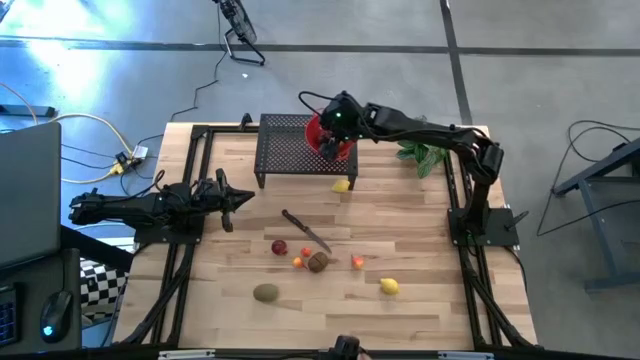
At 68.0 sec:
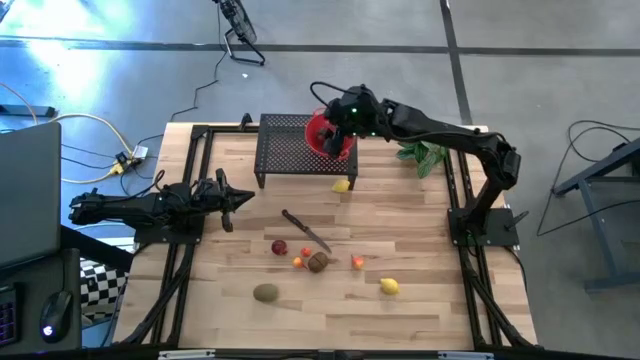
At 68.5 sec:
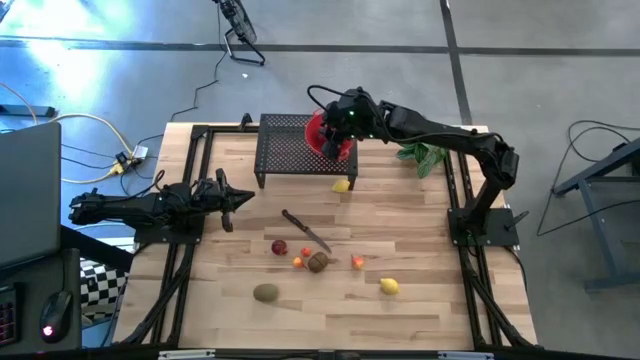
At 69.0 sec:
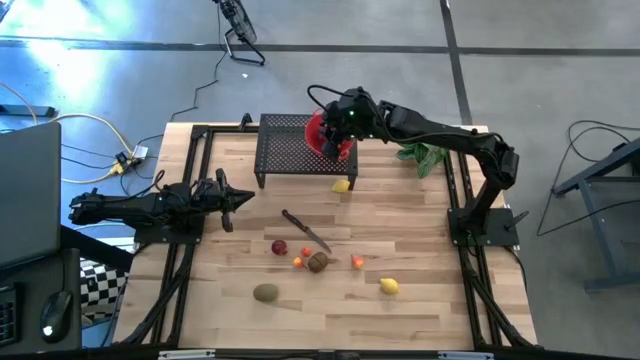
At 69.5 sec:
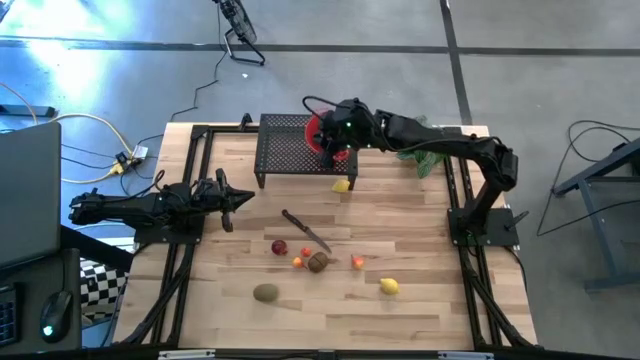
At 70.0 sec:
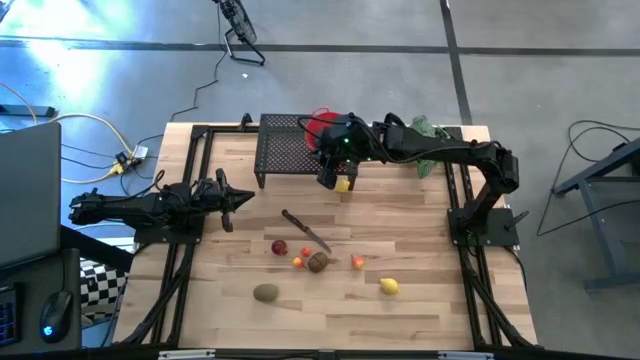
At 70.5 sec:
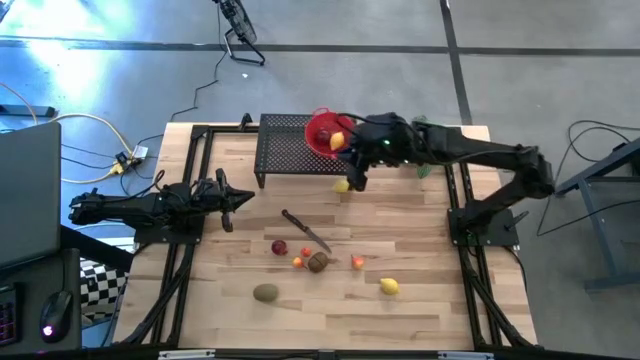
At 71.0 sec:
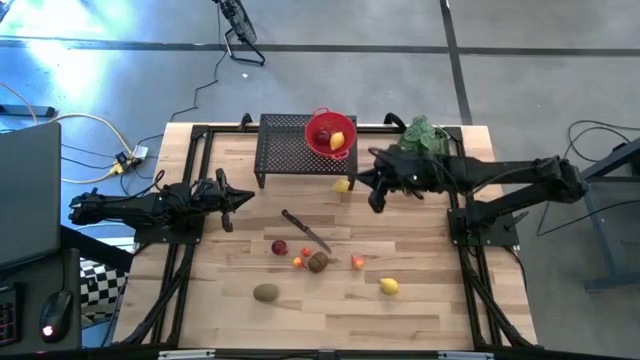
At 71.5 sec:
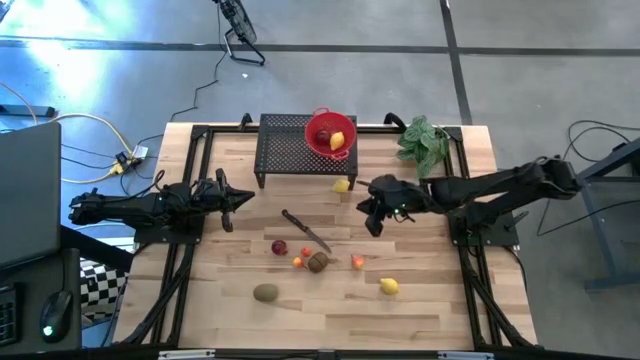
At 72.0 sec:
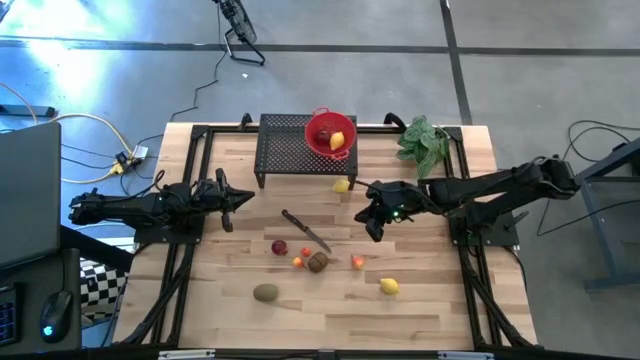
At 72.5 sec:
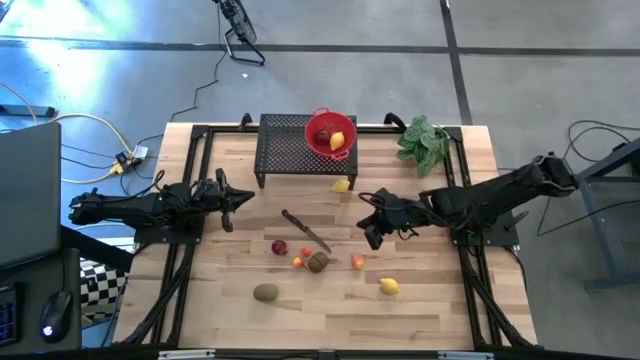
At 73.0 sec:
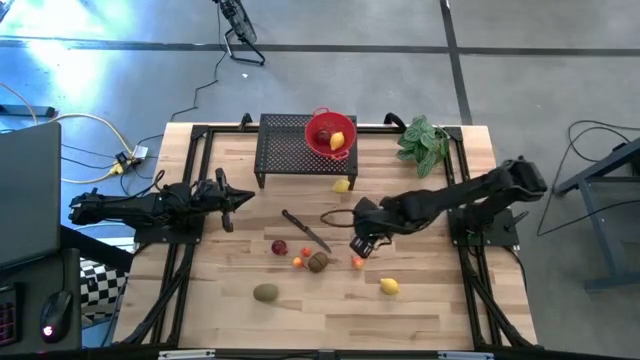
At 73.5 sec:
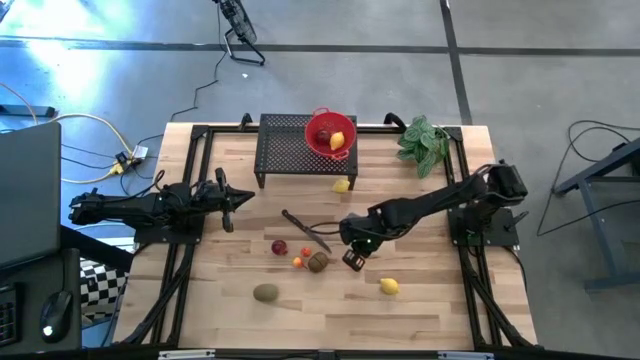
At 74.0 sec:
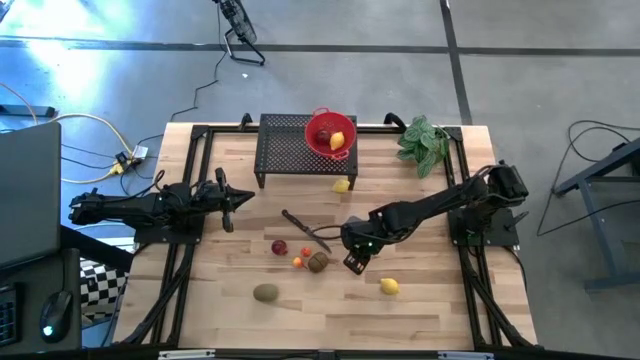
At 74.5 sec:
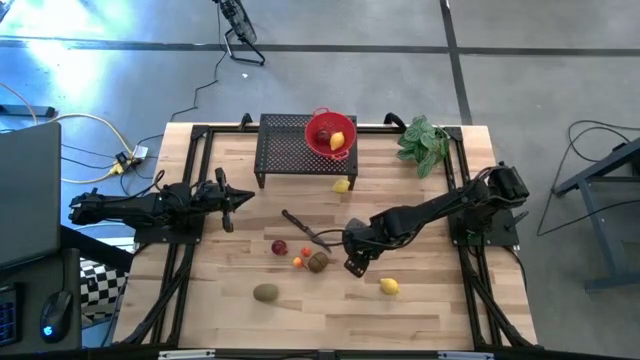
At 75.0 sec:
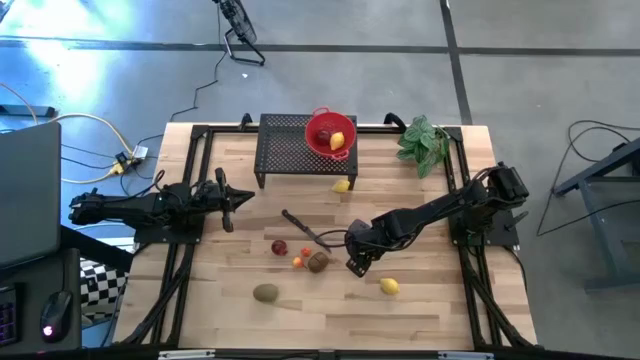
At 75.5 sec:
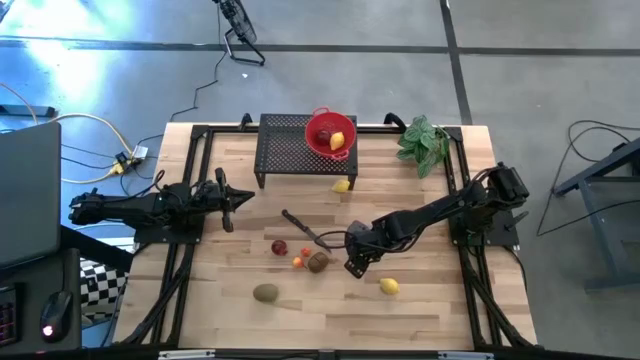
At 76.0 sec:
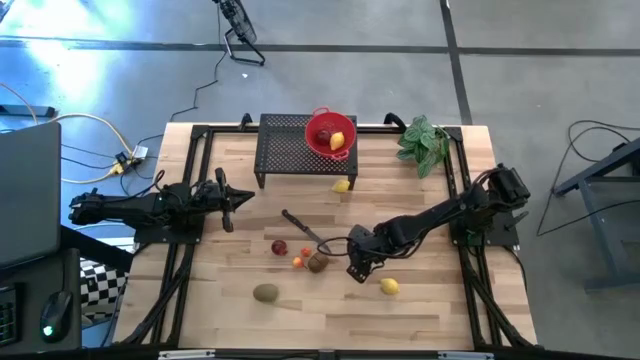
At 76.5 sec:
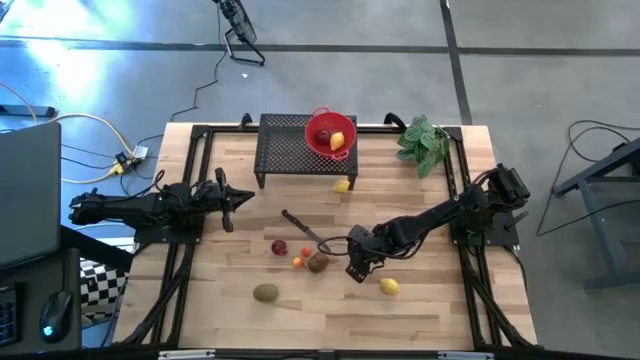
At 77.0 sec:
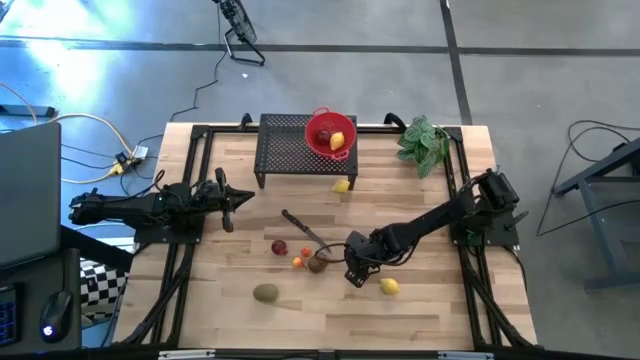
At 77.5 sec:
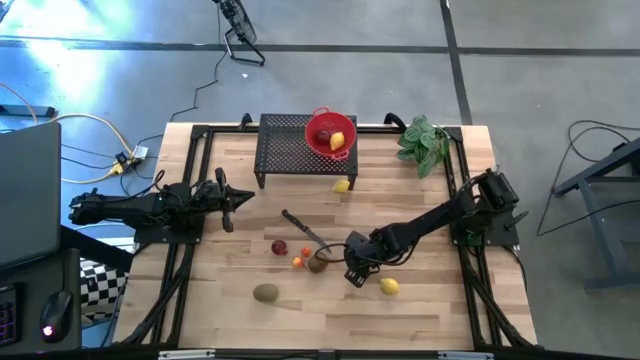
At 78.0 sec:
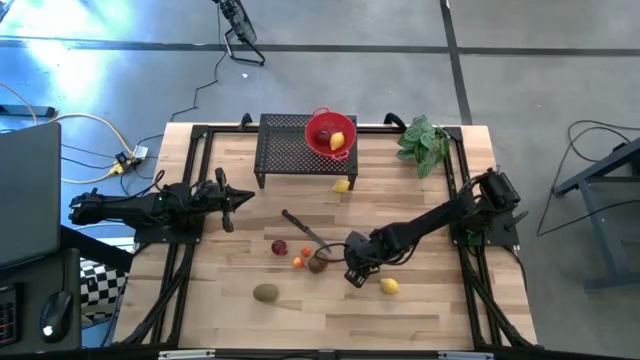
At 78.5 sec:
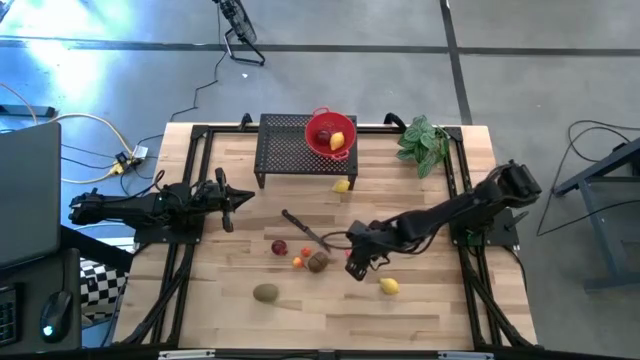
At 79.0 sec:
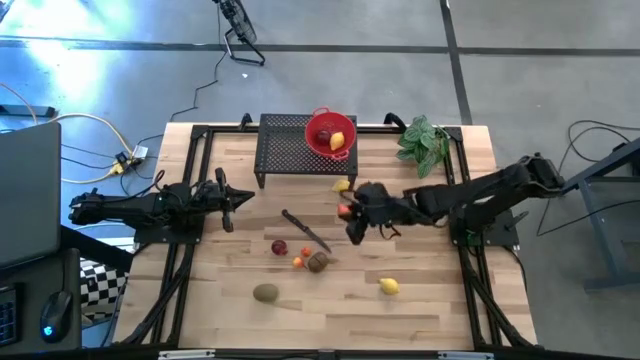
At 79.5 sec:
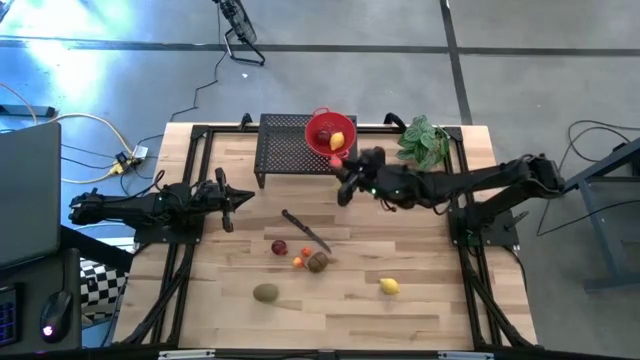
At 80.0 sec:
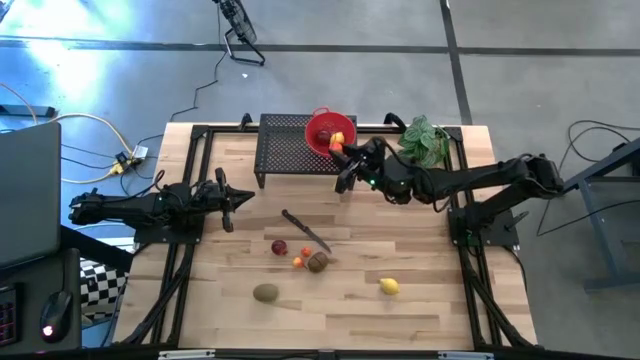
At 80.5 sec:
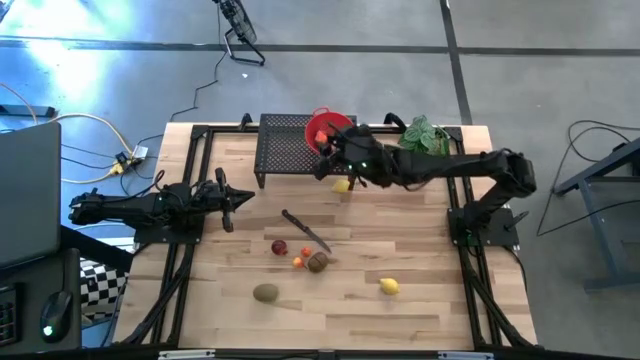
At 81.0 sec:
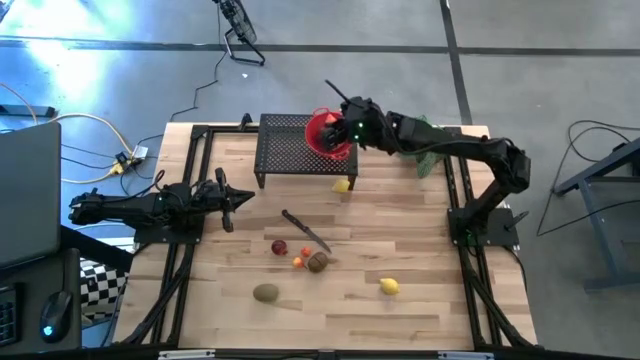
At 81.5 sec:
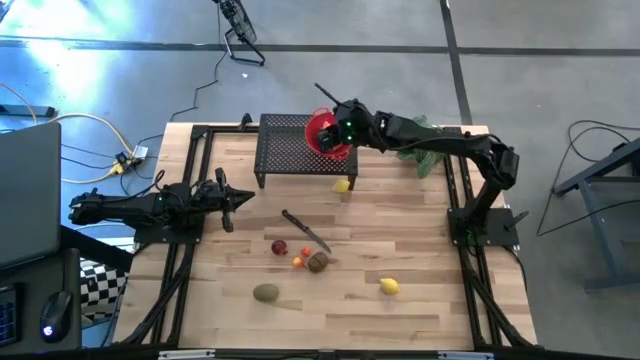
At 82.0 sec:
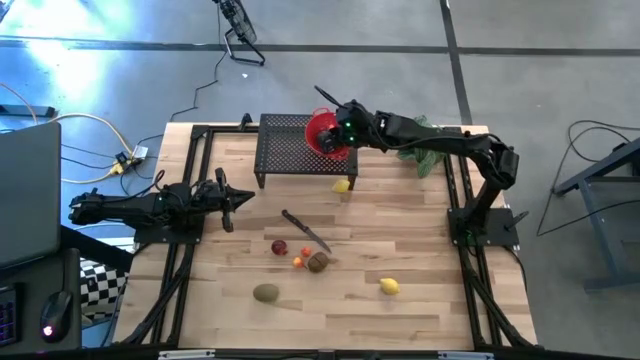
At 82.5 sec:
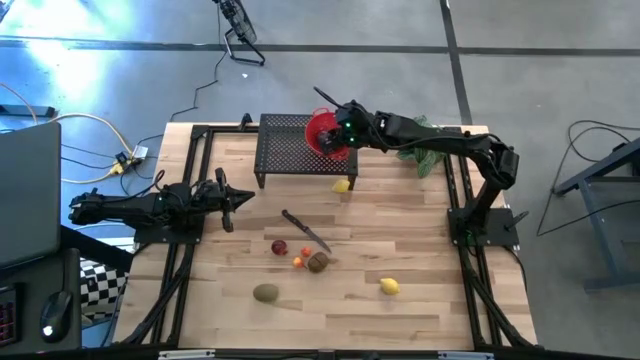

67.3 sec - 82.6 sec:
Task: Pick & Place Fruit
Put the bottom right pear into the colander on the shelf

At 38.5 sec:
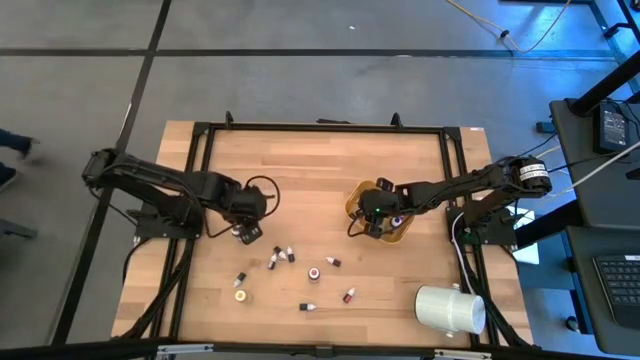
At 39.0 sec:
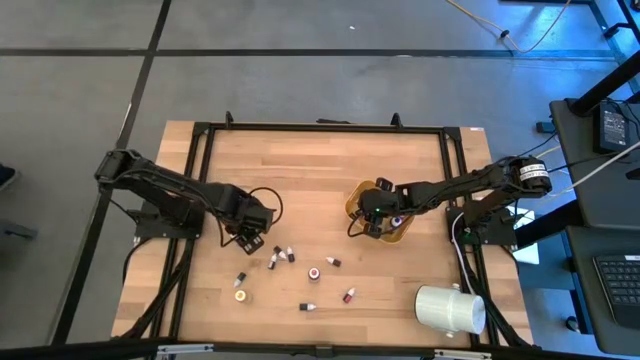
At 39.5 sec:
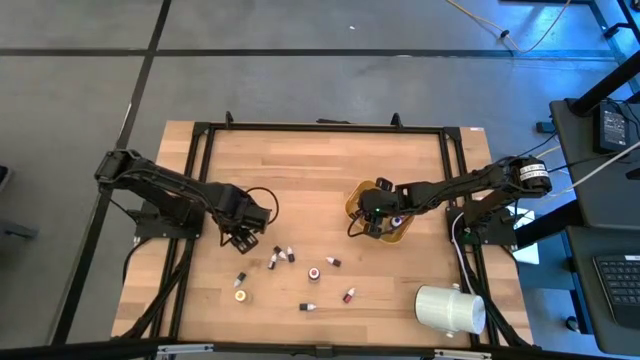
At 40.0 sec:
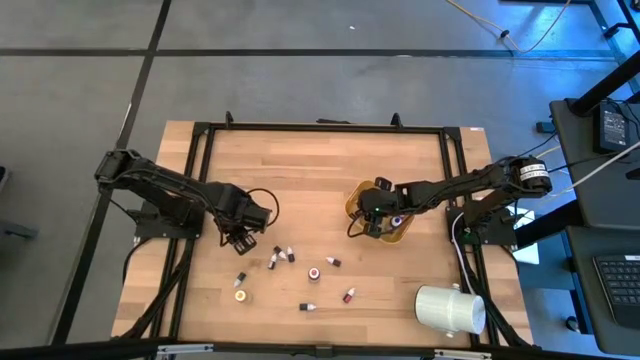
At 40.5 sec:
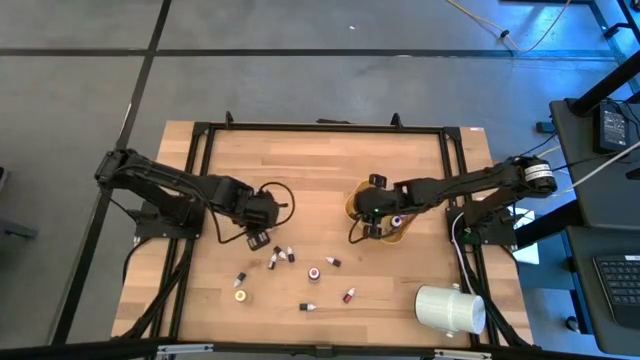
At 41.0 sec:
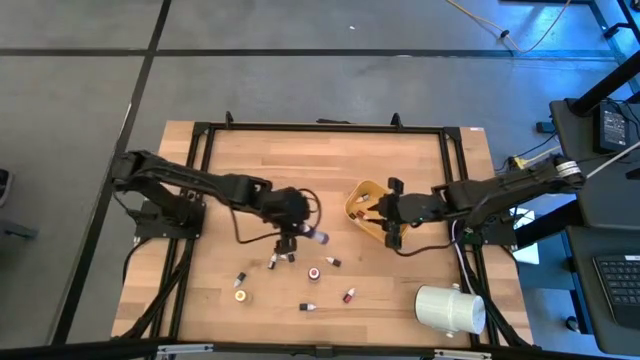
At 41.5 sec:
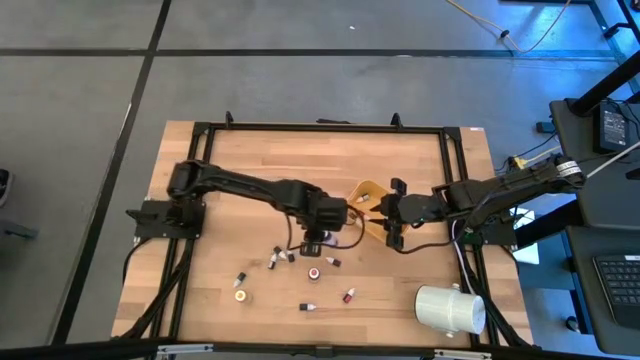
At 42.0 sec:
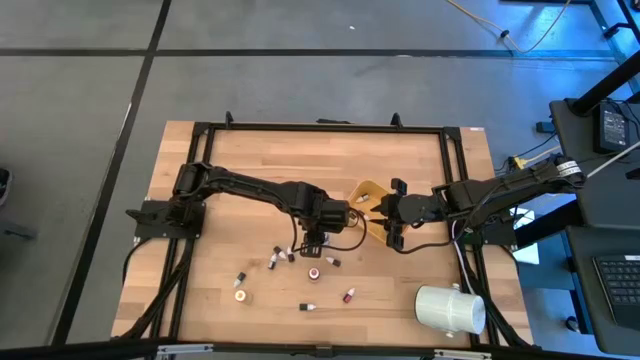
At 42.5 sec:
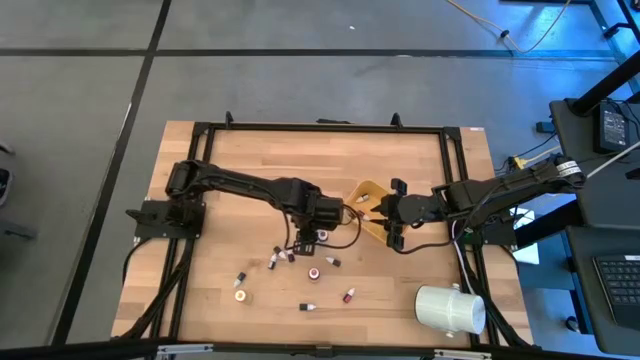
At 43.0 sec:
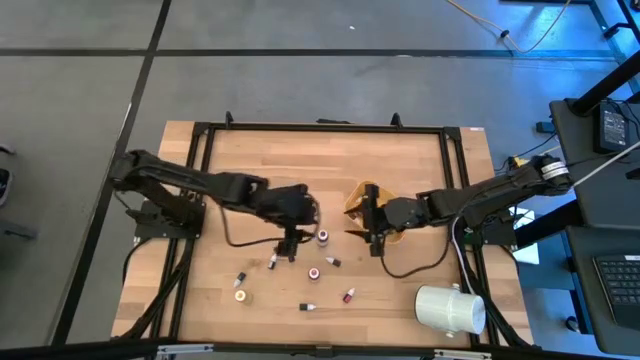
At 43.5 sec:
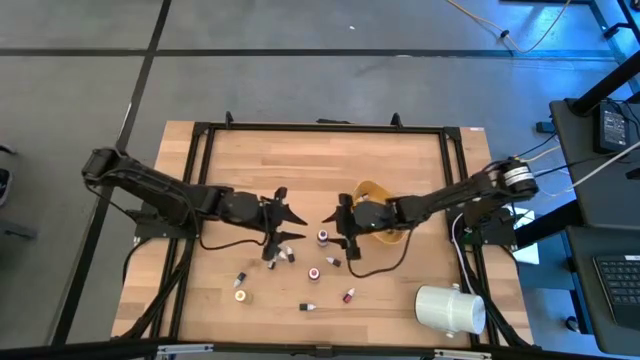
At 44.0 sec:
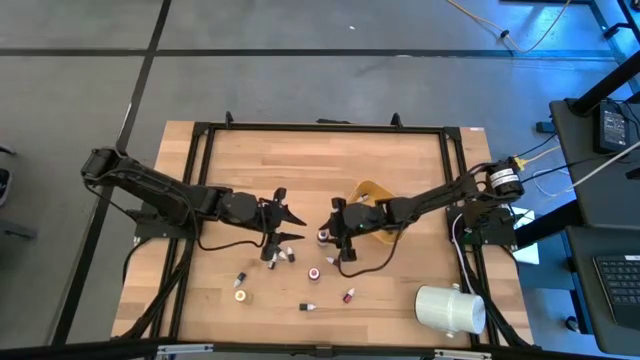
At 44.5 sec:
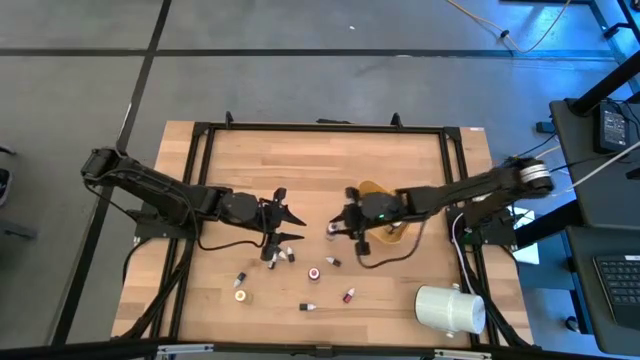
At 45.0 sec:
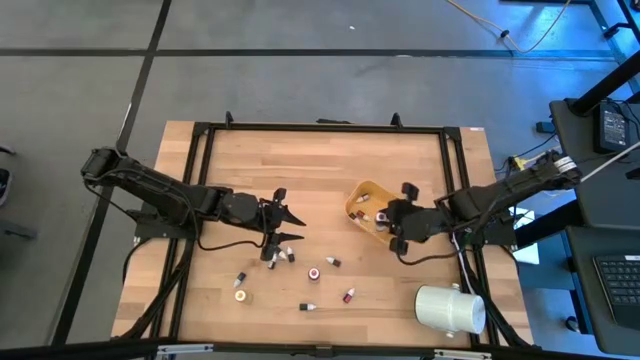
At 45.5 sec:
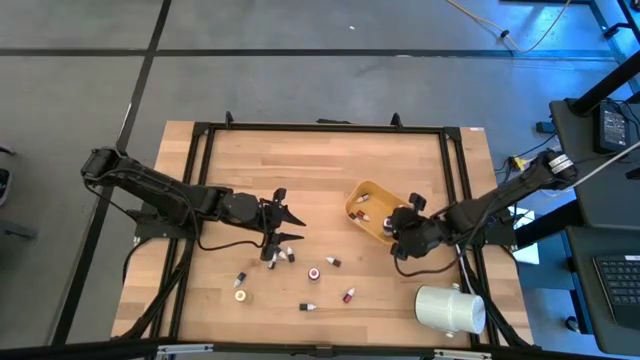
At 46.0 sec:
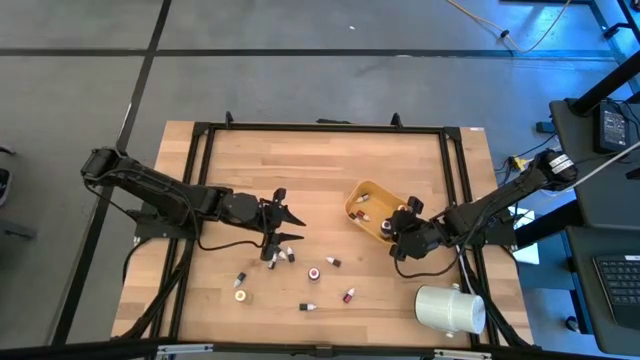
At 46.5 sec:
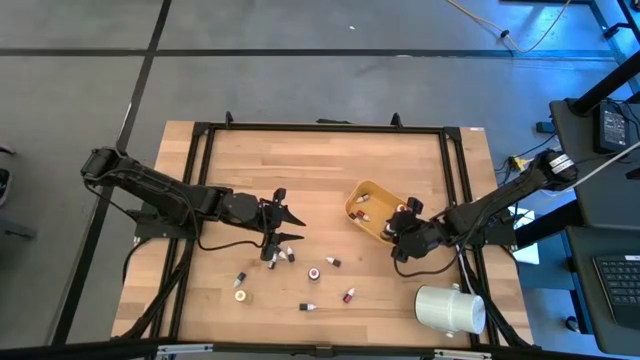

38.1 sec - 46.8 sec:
Task: Pick & Place food coloring
Put the large purple food coloring bottle in the yellow bin
